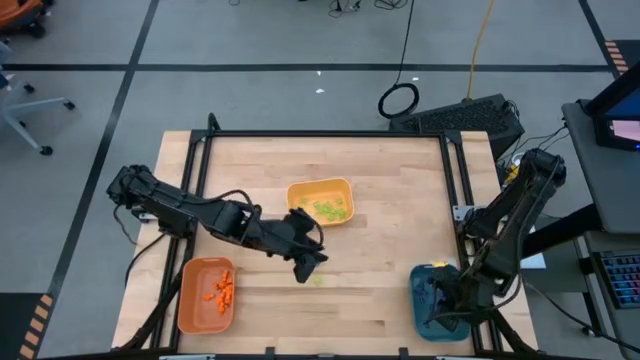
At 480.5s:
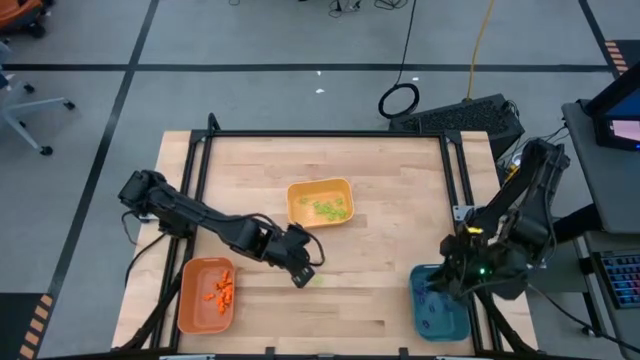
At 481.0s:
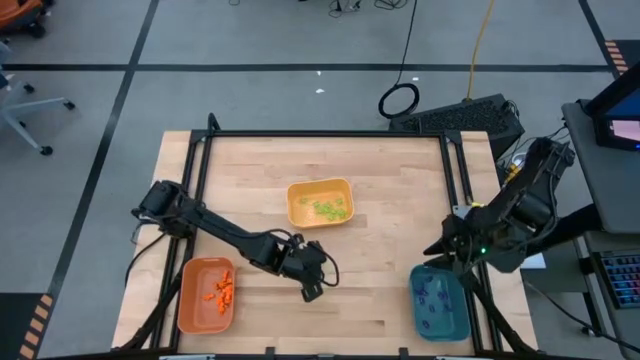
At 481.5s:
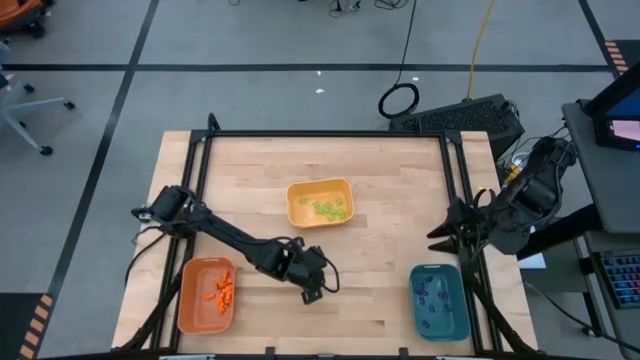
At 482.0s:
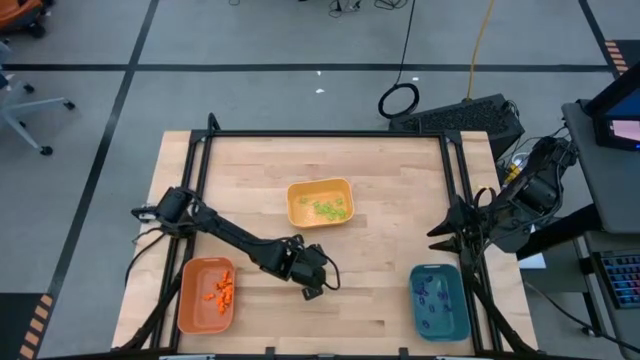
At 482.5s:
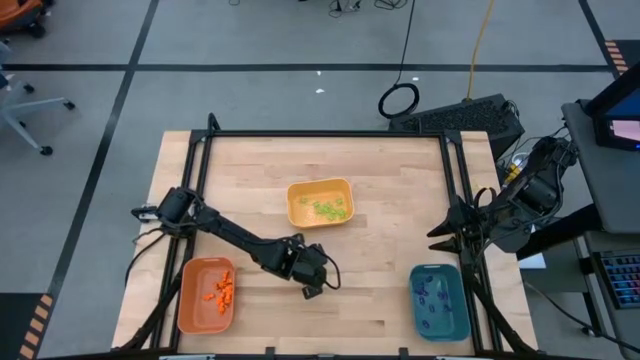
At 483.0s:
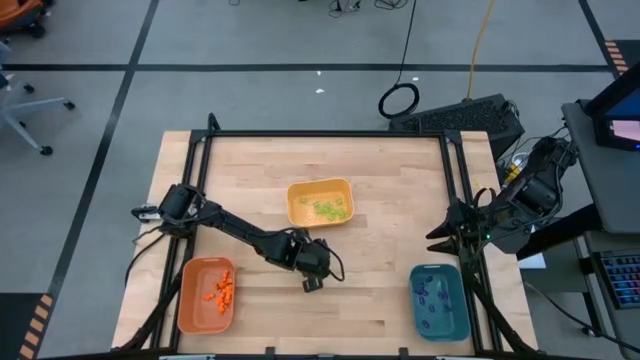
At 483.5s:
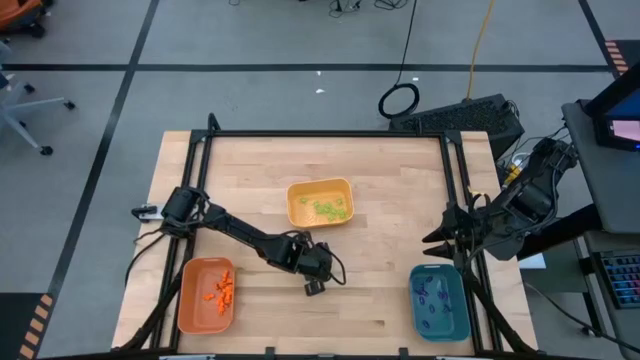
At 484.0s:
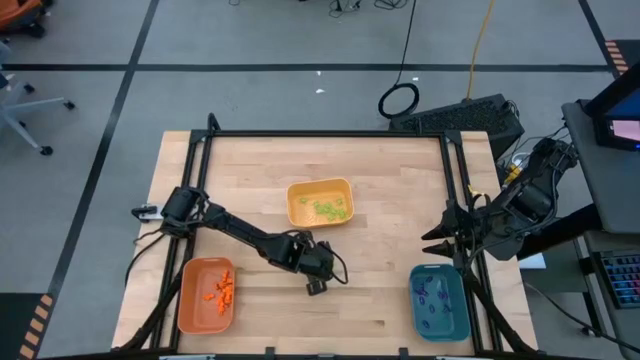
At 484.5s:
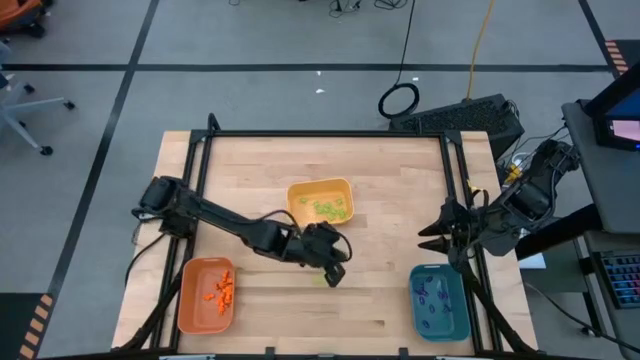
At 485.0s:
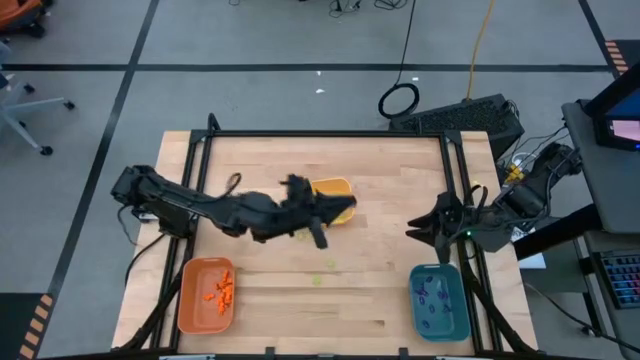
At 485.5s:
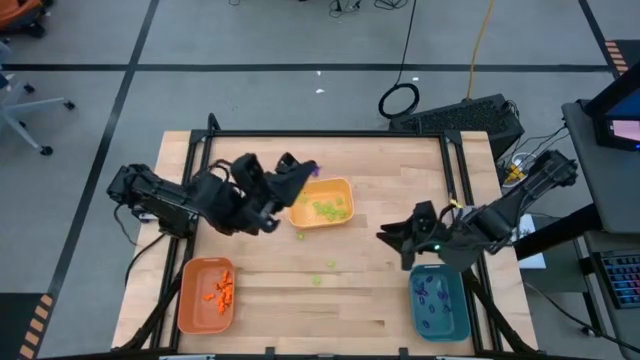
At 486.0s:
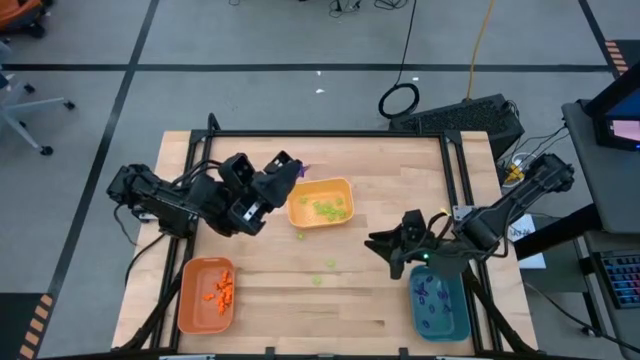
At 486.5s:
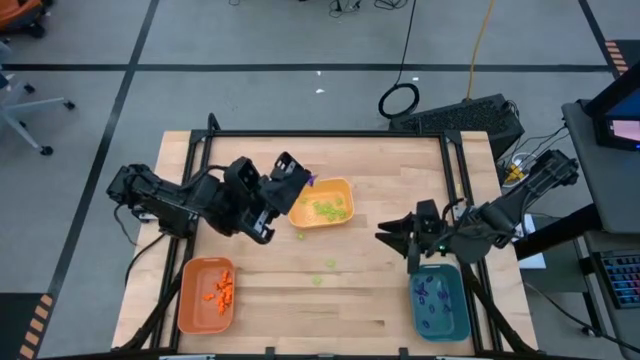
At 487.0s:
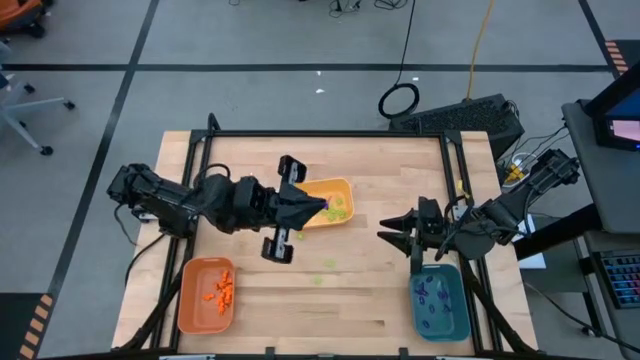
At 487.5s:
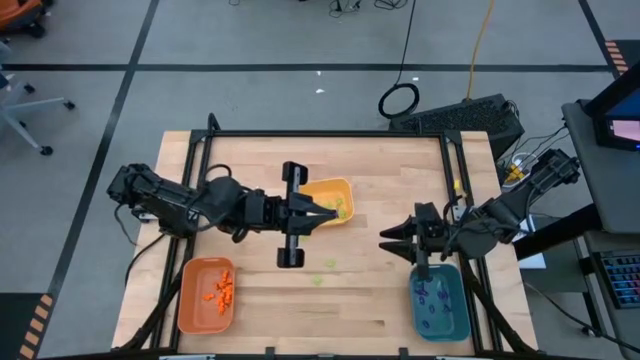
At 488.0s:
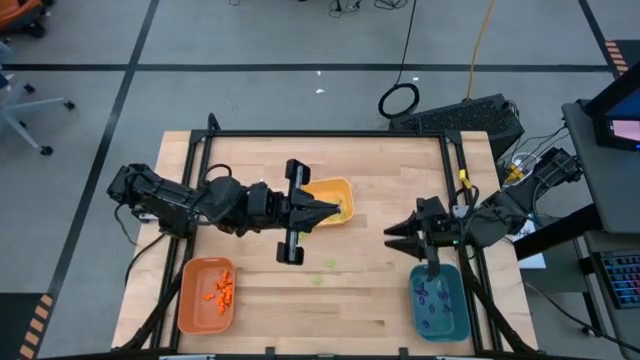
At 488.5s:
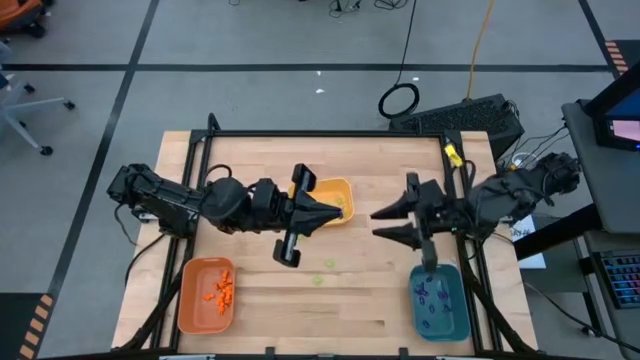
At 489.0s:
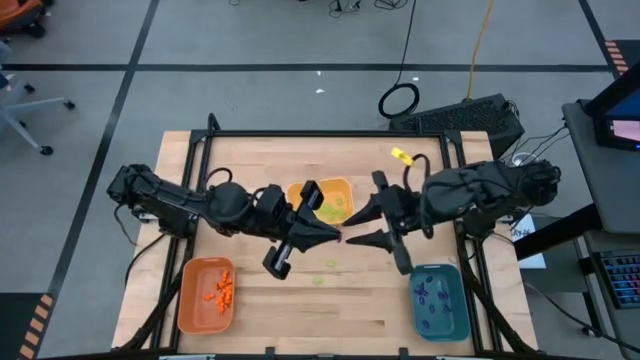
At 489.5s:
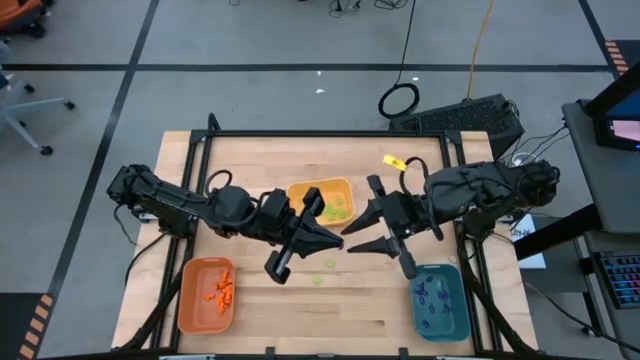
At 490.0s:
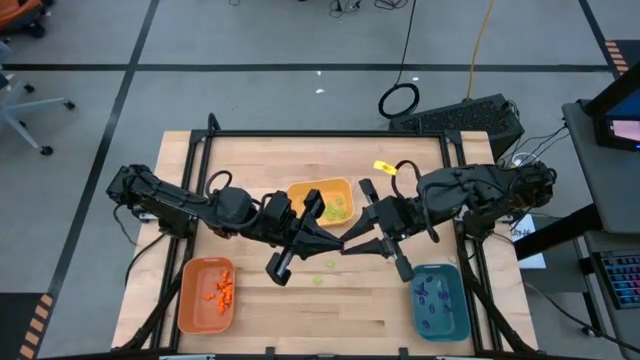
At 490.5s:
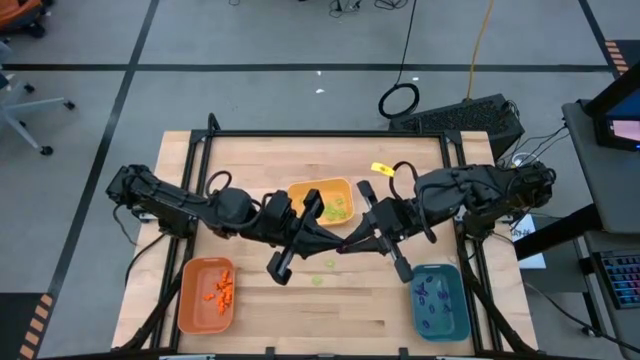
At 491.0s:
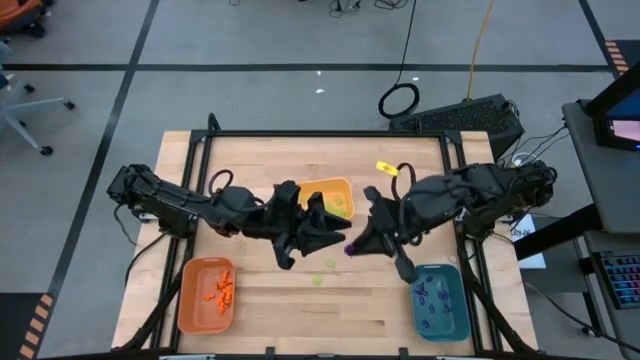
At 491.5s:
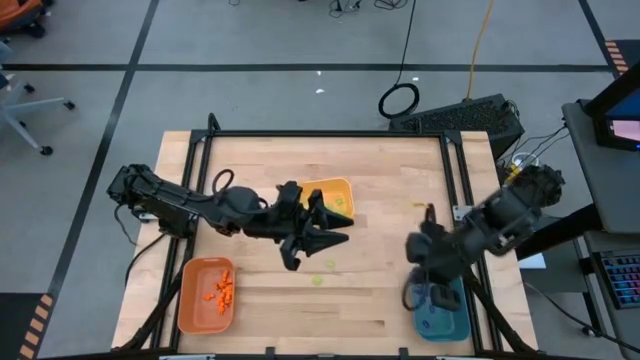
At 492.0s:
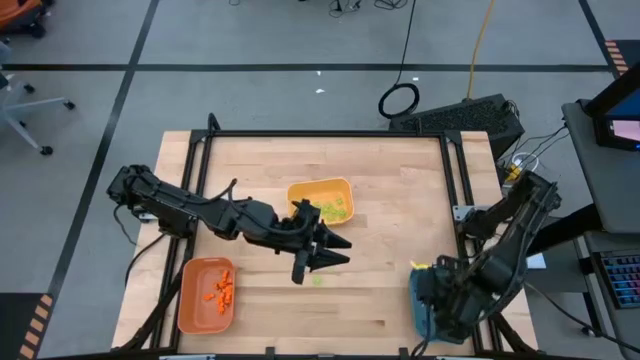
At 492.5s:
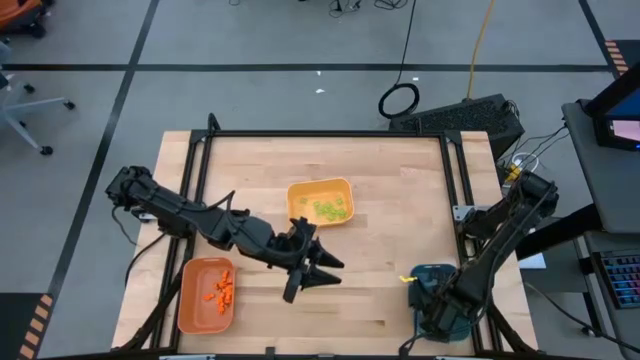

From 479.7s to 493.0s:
Task: Sort Halloween decoration
Put the violet witch hat toy into the blue bin

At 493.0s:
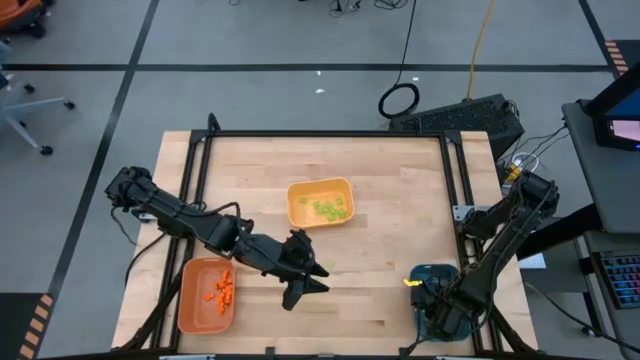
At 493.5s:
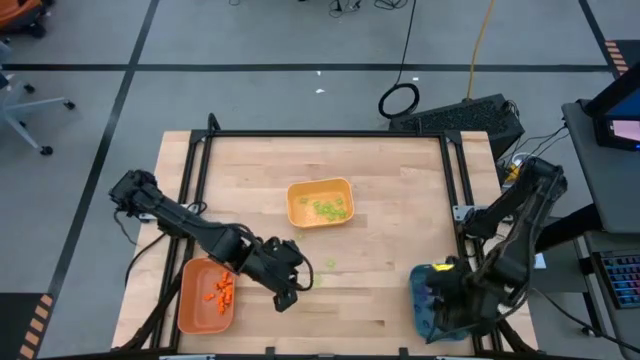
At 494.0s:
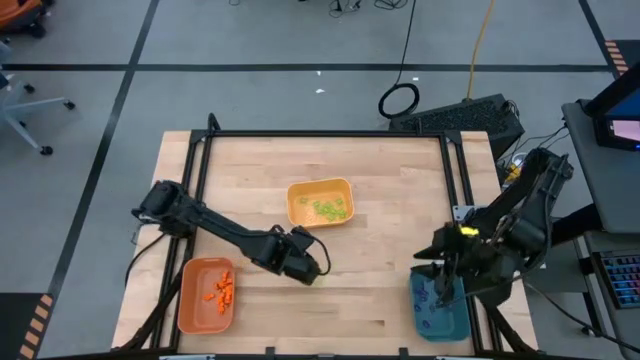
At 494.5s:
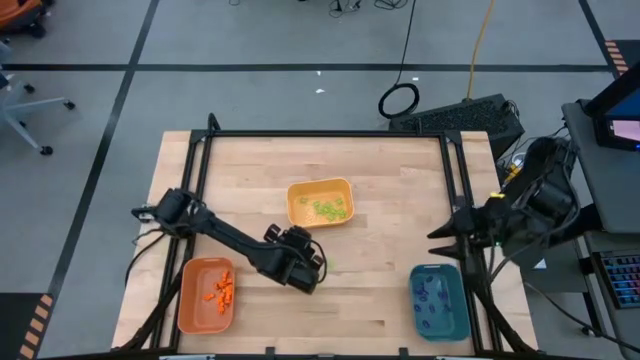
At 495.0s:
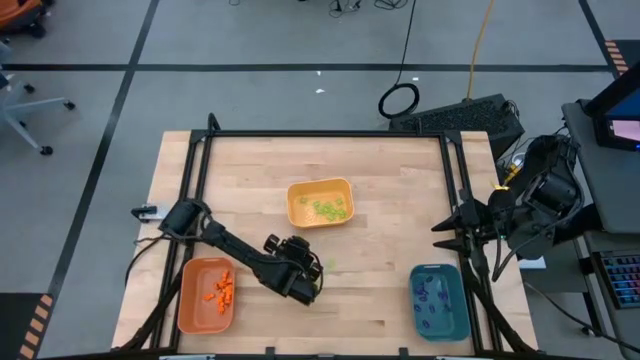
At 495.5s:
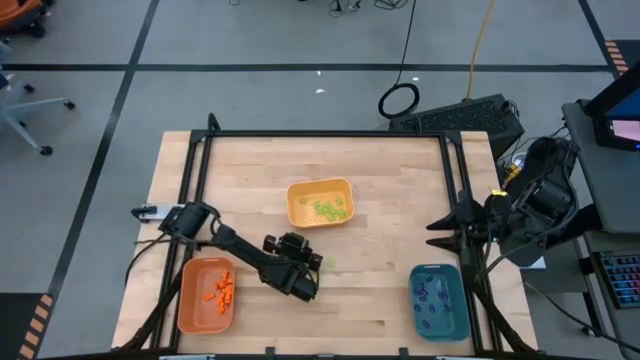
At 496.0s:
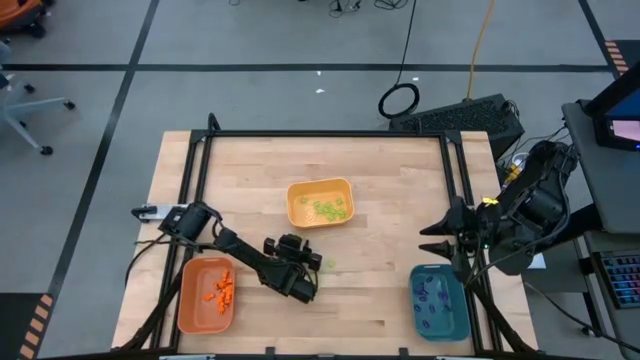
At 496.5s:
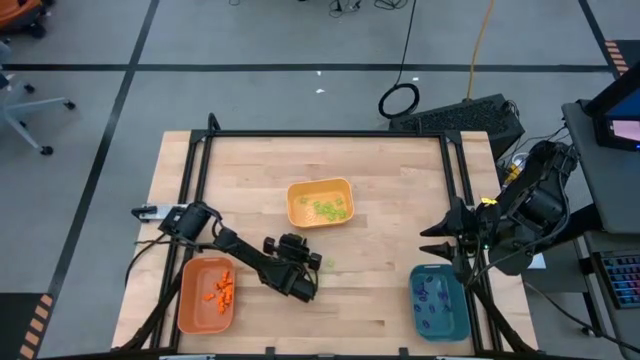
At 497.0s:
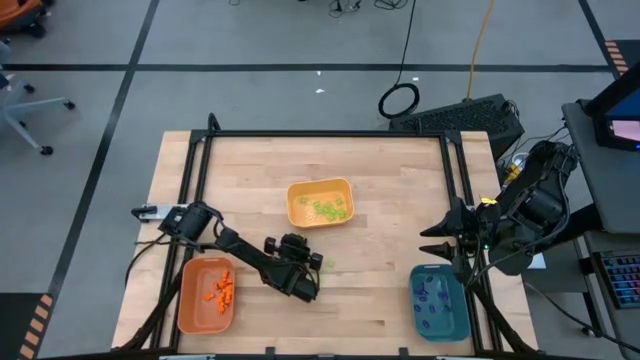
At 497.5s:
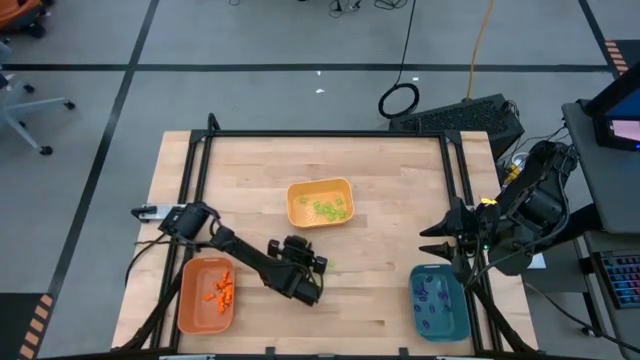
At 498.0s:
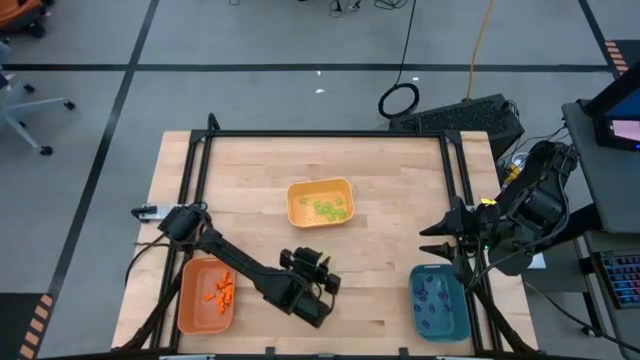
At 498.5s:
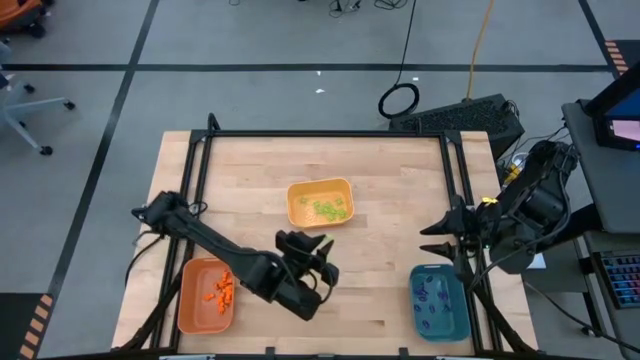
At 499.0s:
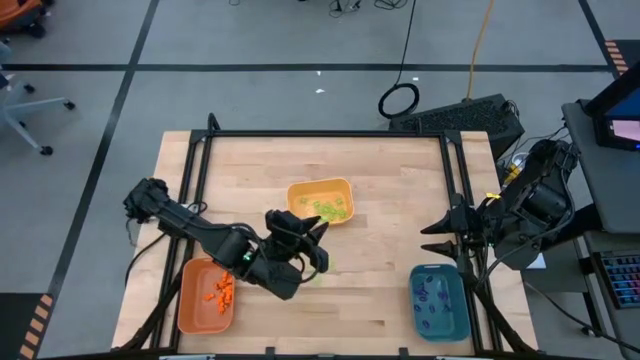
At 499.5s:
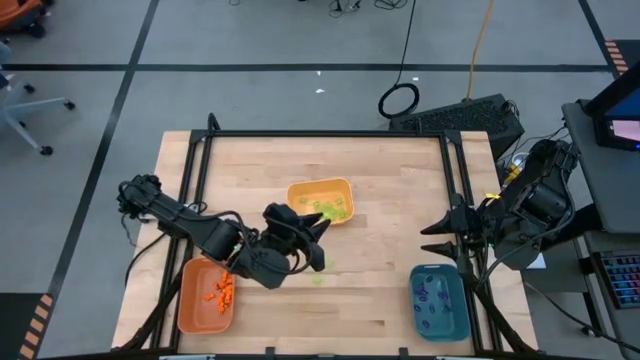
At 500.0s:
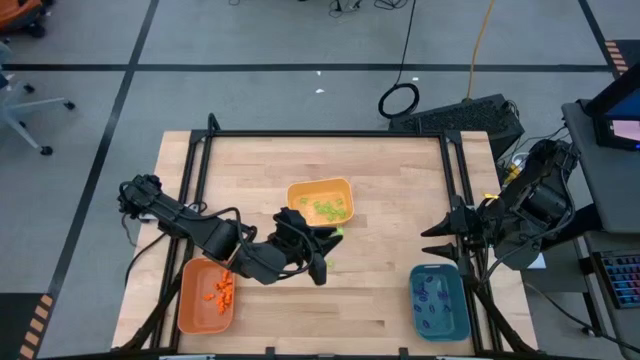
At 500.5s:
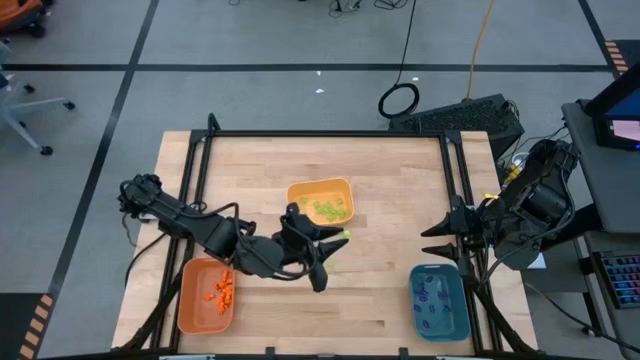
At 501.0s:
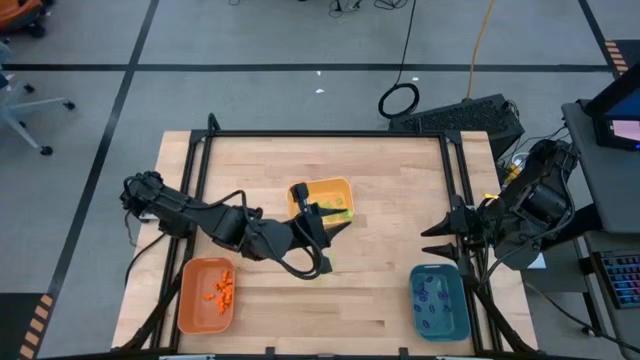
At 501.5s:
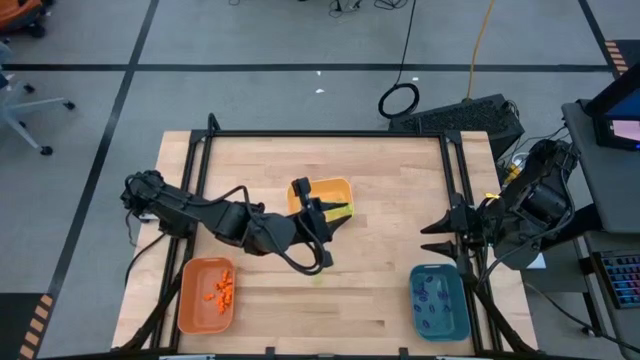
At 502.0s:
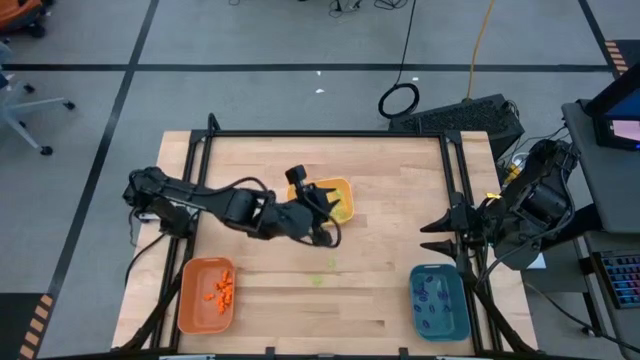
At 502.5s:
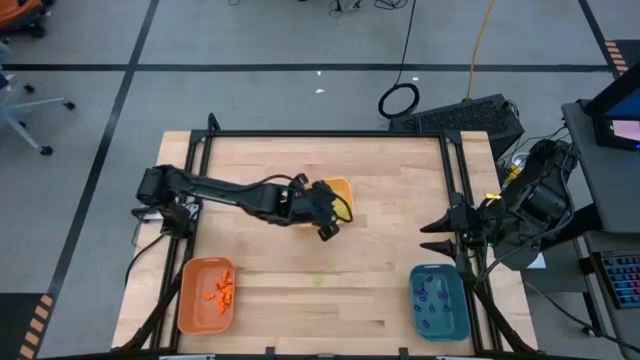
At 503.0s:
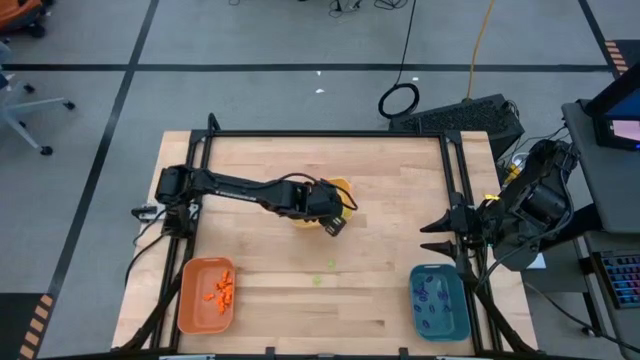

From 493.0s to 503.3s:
Put the green spider toy into the yellow bin
